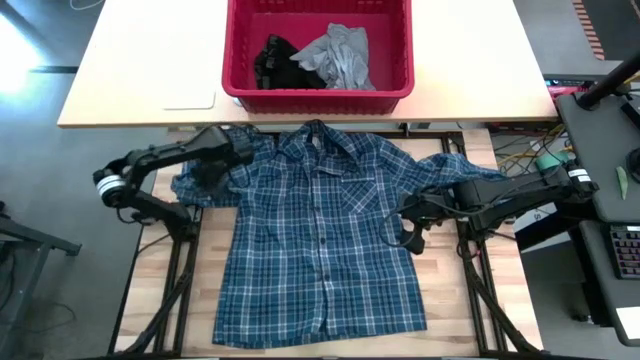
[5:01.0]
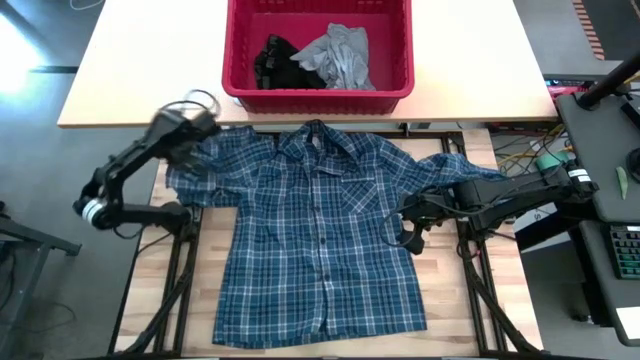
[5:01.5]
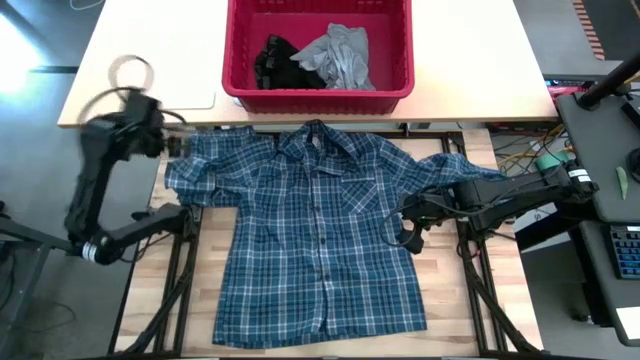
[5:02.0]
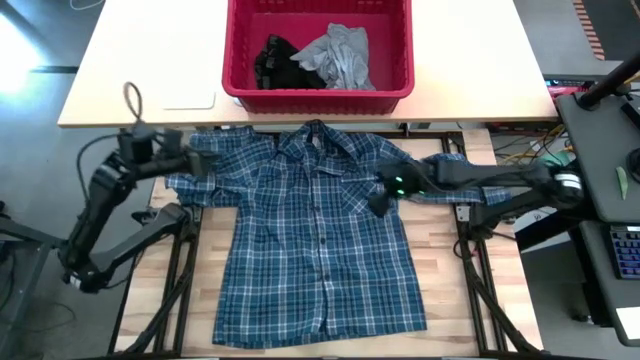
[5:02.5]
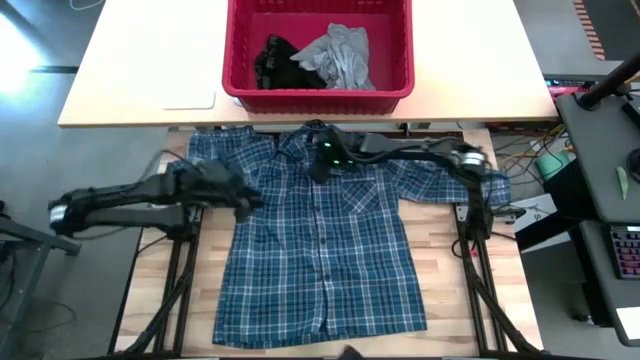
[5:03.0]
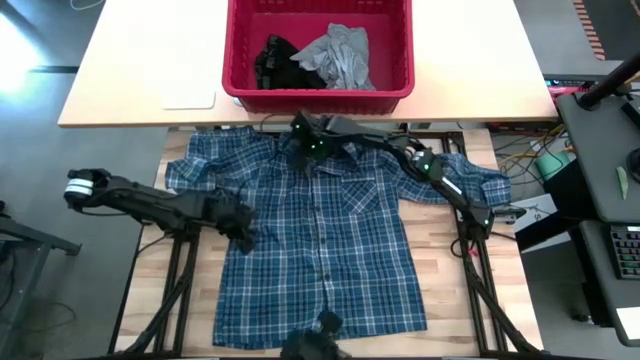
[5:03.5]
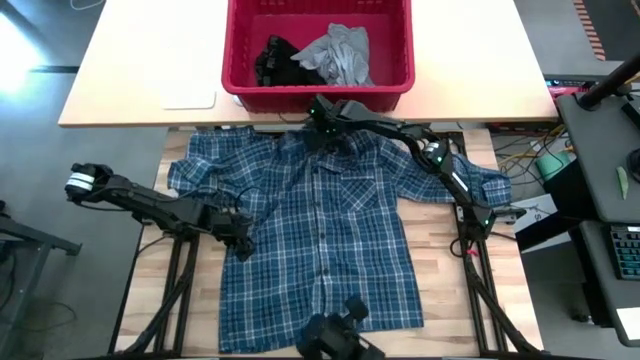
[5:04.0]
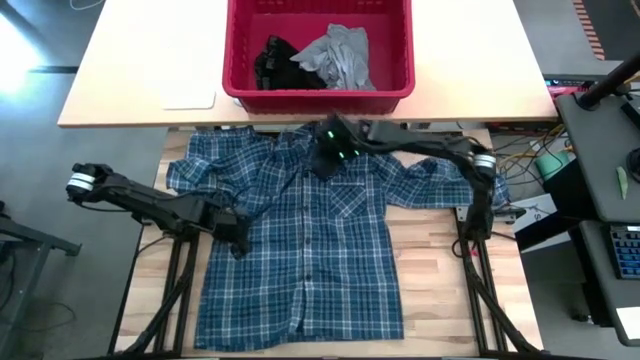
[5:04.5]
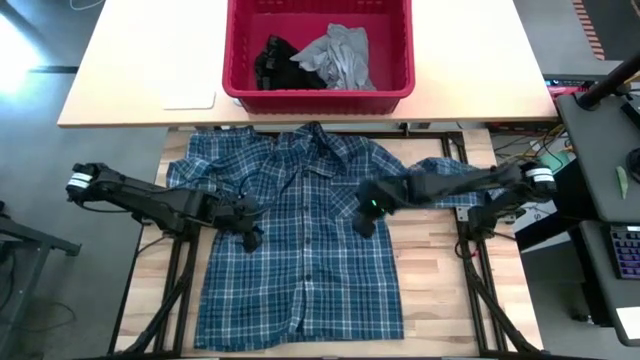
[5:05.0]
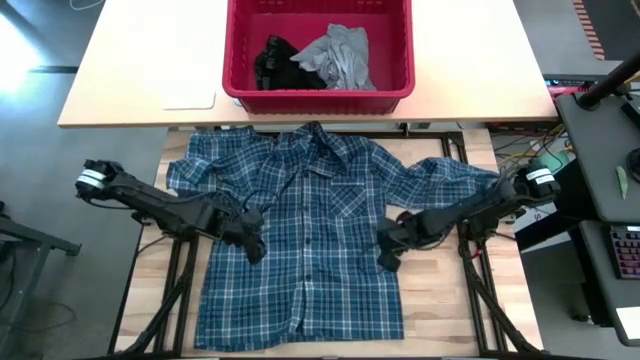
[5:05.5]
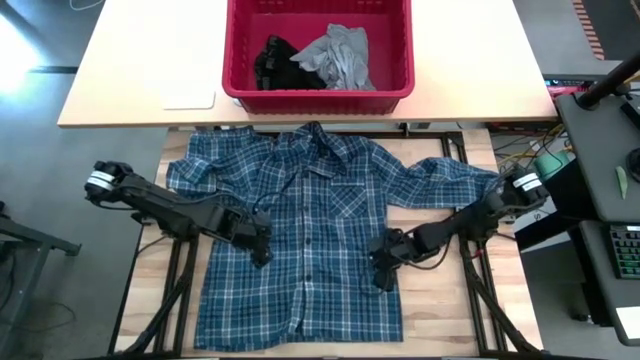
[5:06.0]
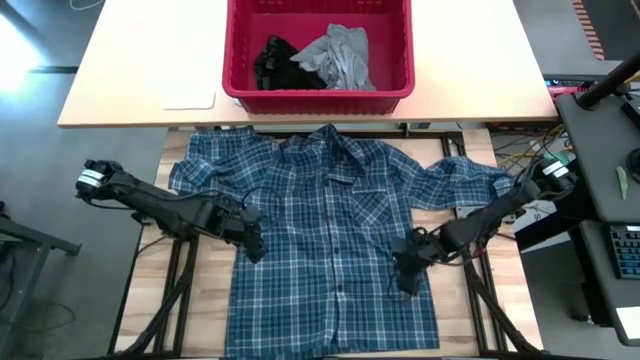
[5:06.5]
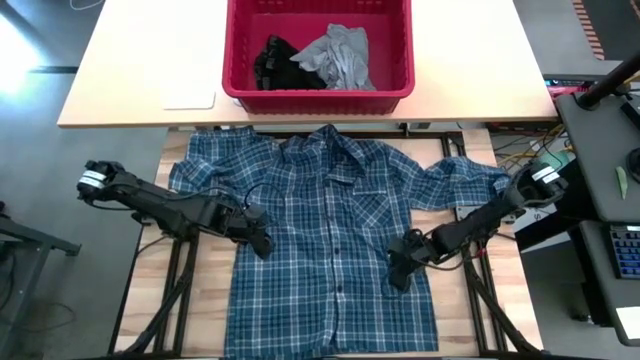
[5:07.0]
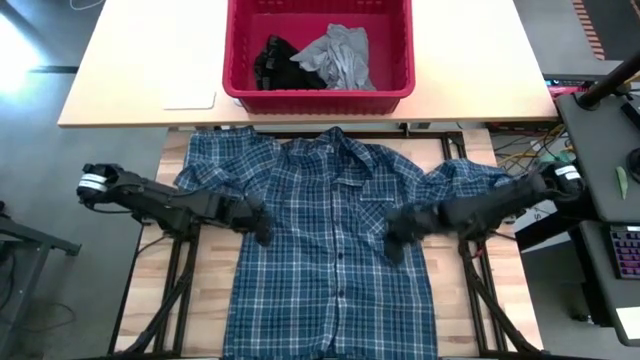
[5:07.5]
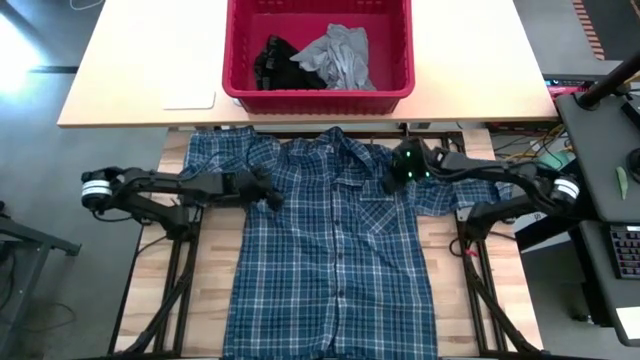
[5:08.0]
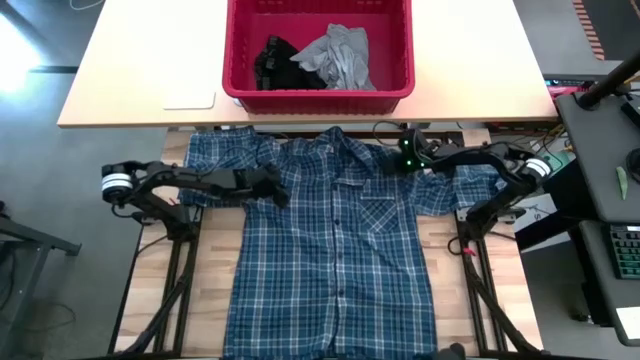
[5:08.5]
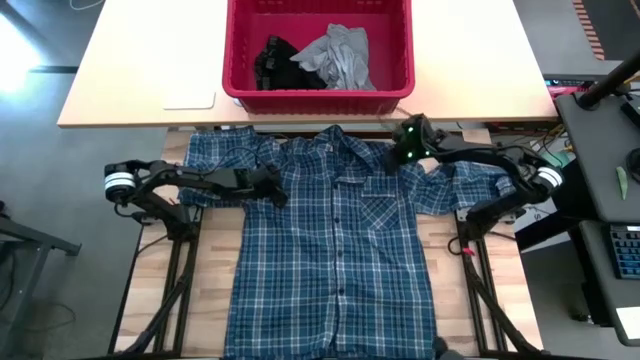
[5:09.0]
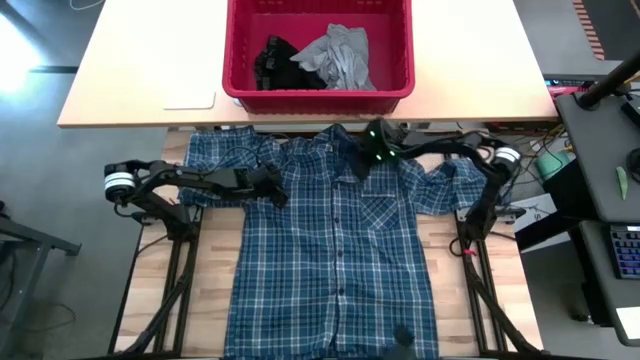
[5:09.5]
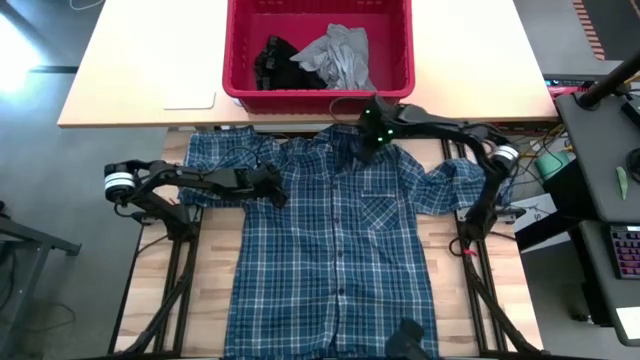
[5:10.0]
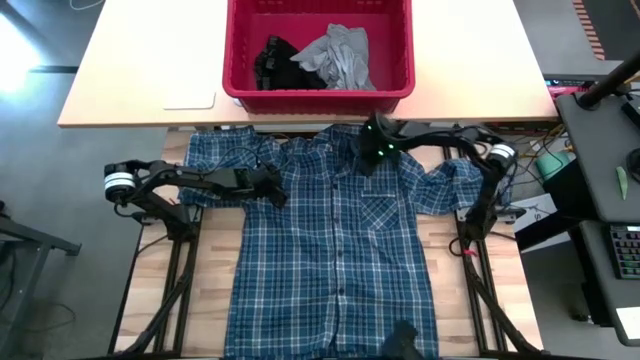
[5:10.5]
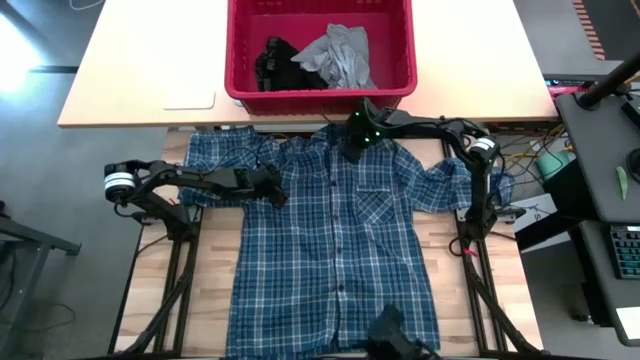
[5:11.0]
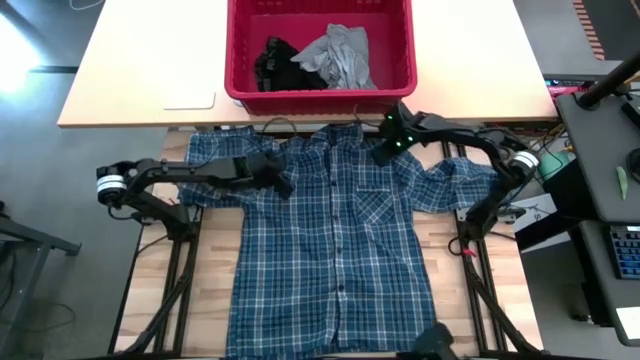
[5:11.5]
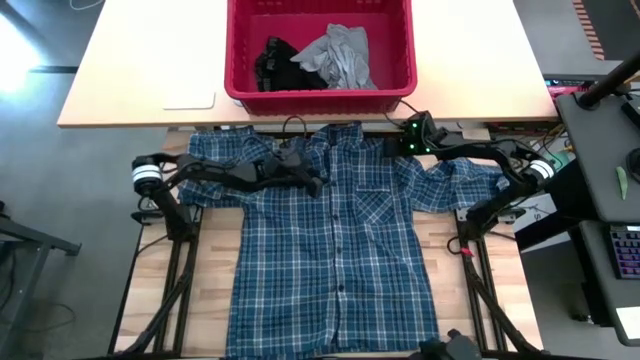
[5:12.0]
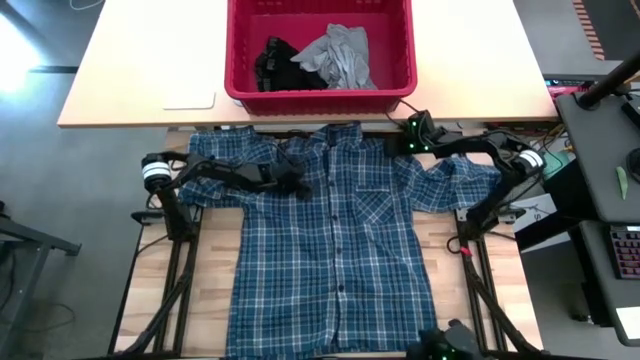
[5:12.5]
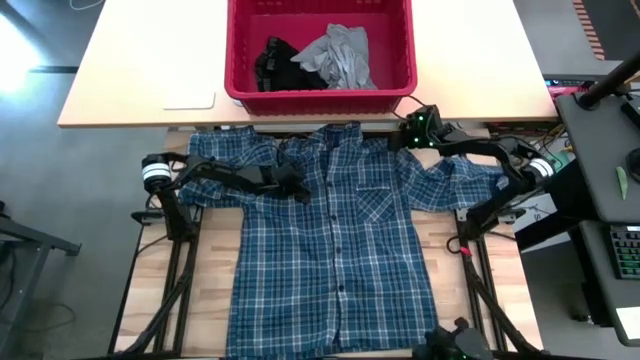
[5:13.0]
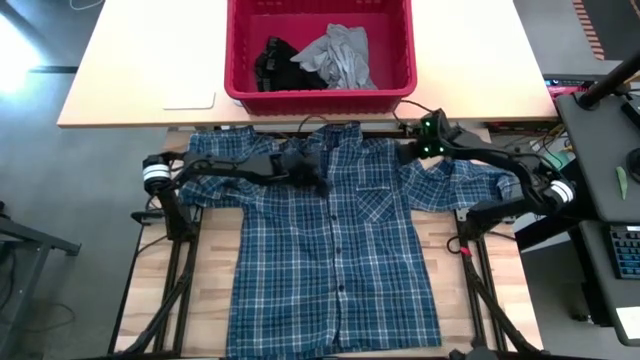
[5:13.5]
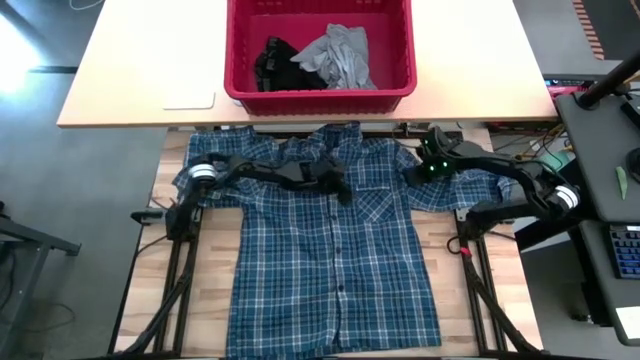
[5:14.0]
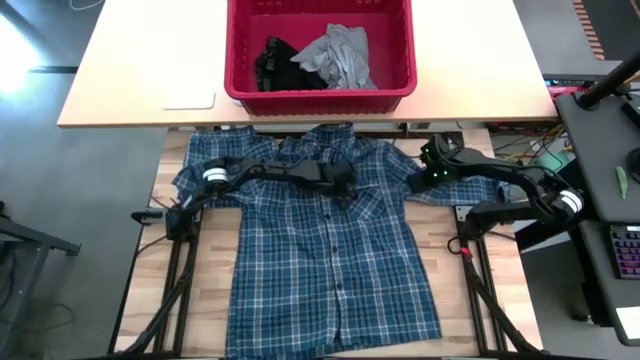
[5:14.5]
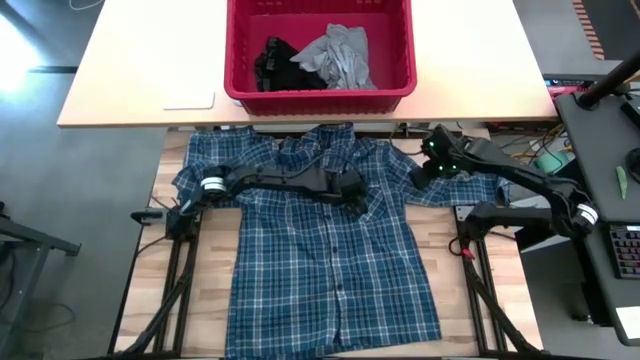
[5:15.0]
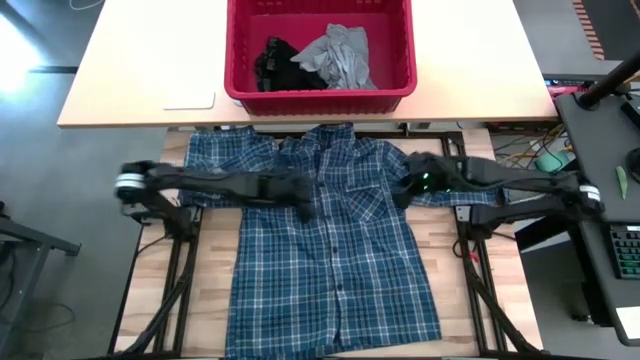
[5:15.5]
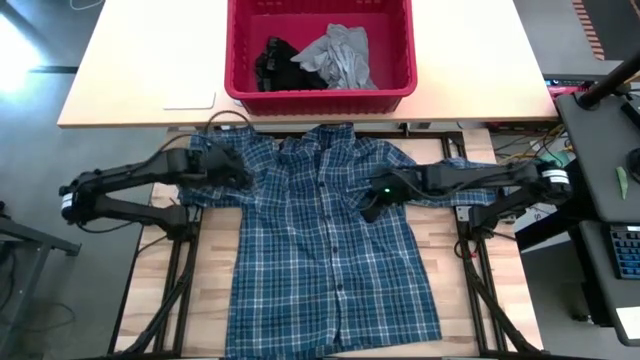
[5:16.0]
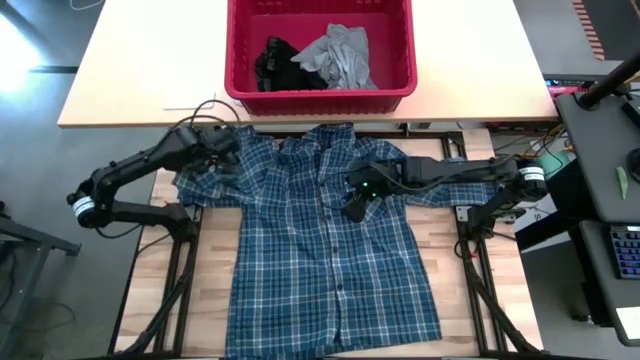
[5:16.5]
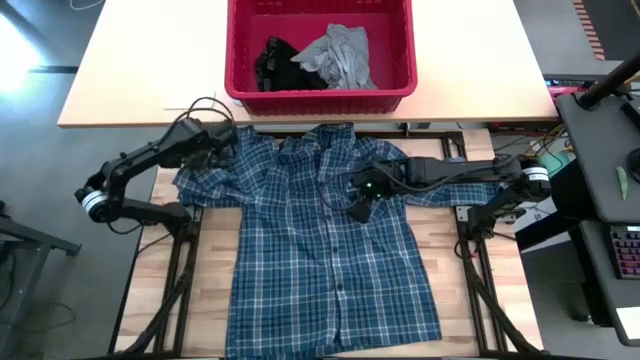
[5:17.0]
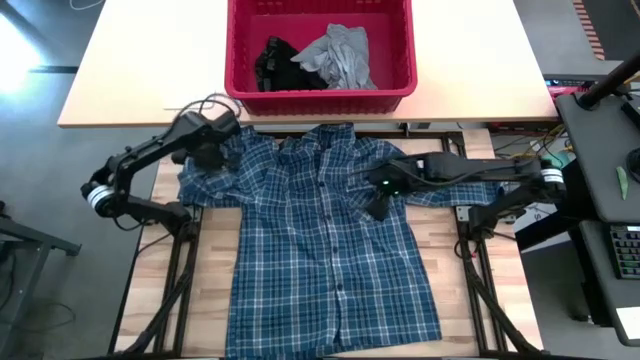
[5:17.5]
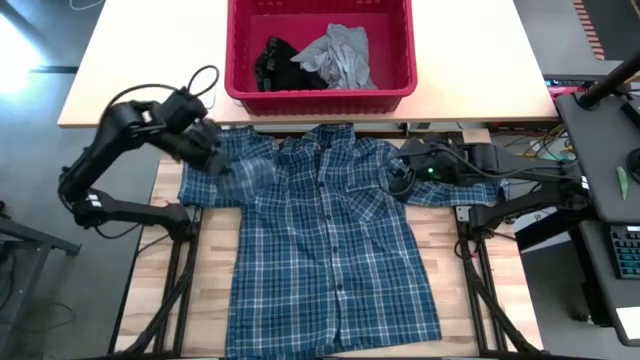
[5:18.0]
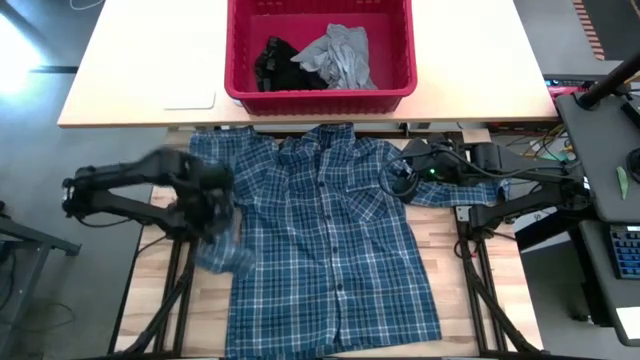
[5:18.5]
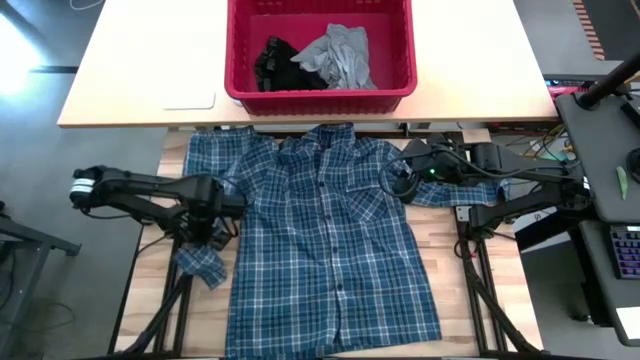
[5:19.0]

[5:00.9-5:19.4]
Task: Fold Laundry from Bin
Fold the blue patterned long sleeve shirt

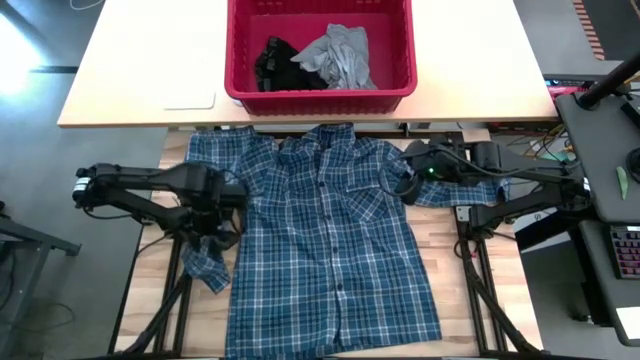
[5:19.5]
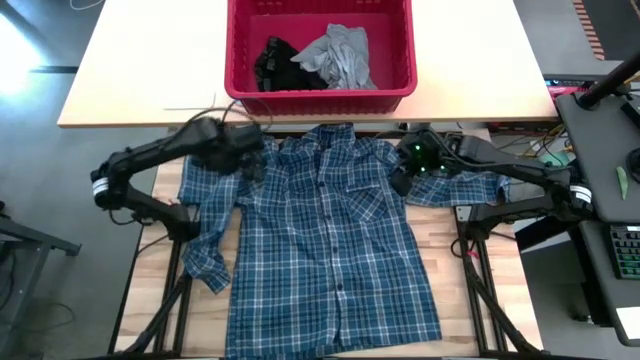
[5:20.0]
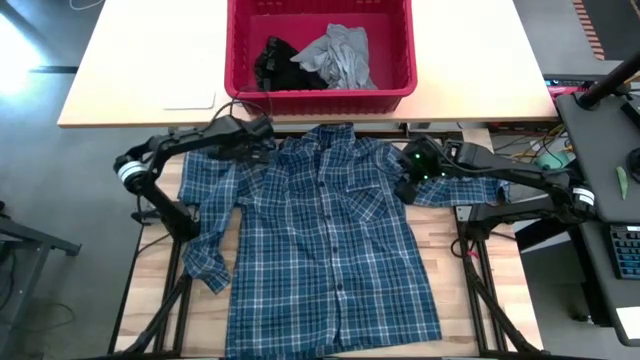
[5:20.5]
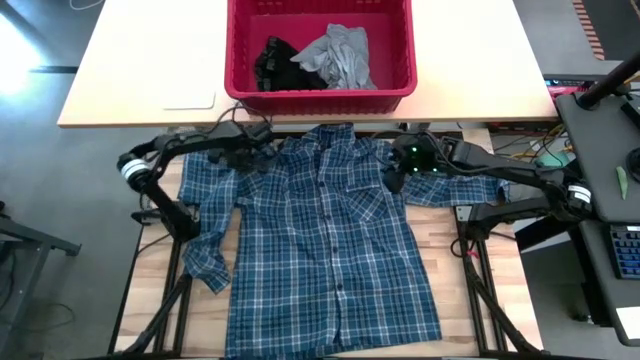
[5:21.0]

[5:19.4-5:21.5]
Fold the blue patterned long sleeve shirt
